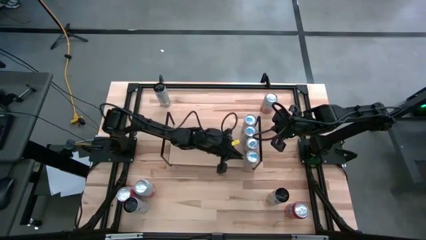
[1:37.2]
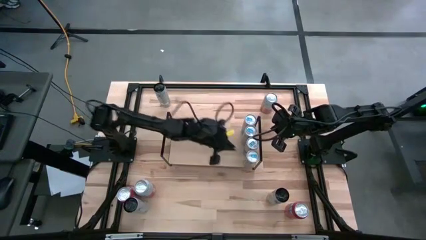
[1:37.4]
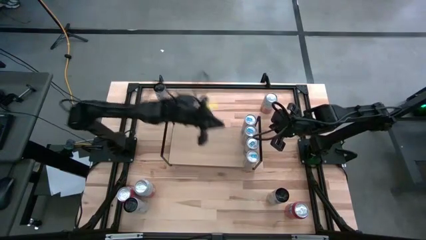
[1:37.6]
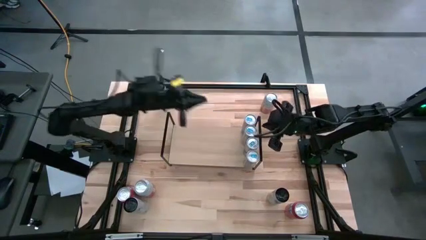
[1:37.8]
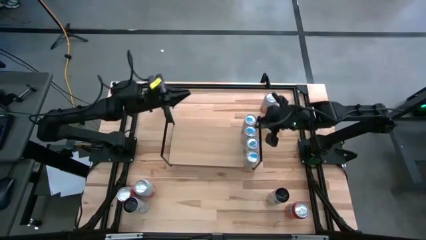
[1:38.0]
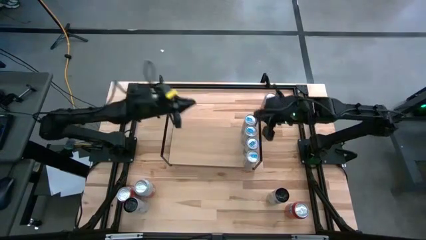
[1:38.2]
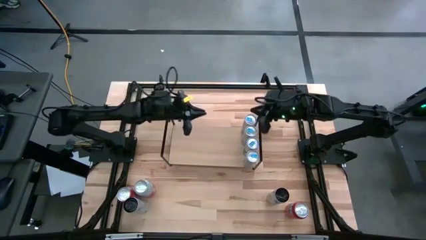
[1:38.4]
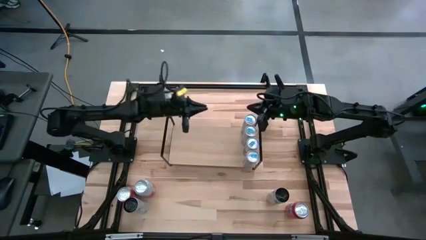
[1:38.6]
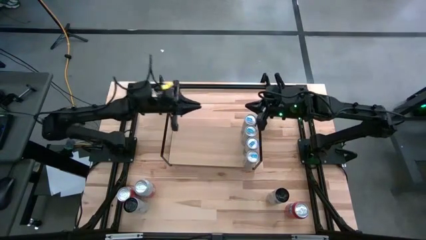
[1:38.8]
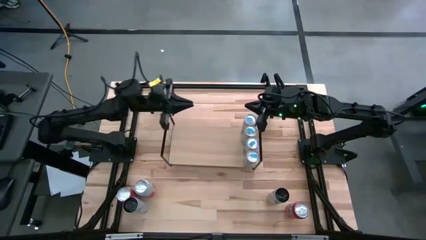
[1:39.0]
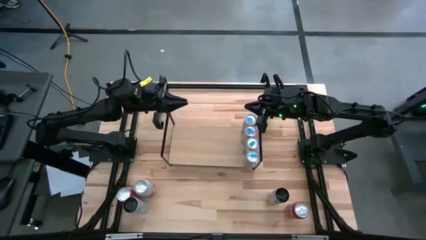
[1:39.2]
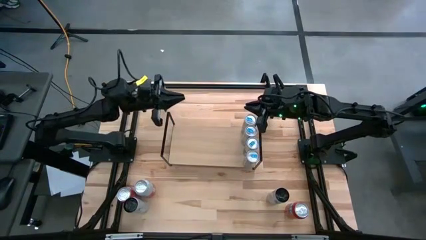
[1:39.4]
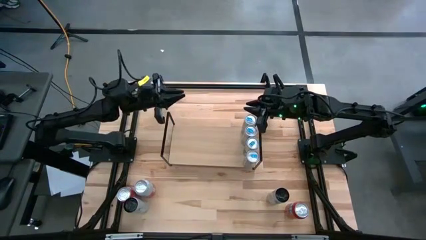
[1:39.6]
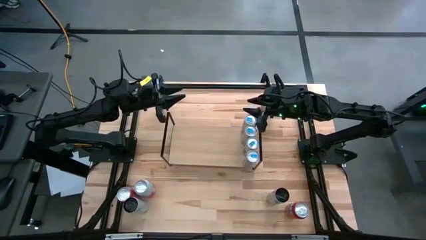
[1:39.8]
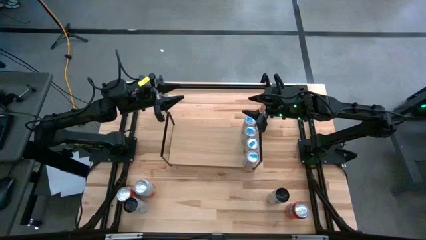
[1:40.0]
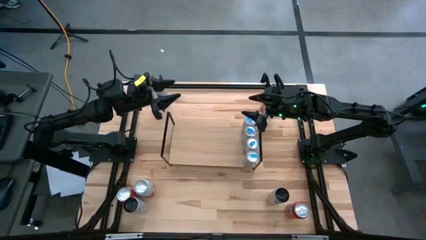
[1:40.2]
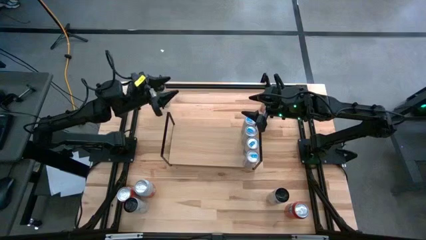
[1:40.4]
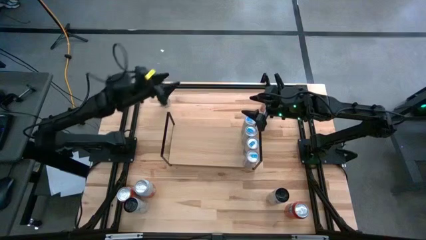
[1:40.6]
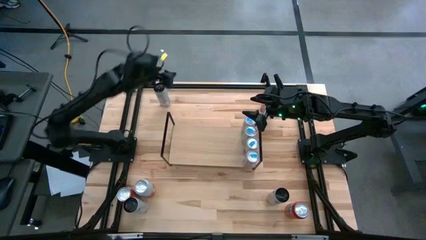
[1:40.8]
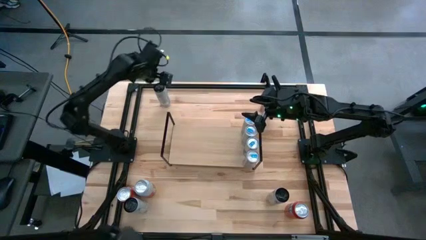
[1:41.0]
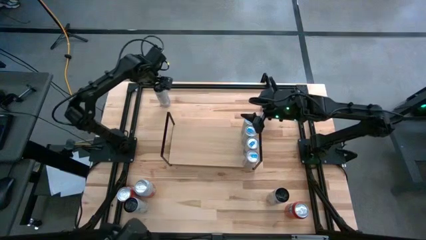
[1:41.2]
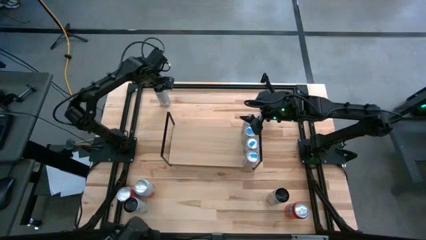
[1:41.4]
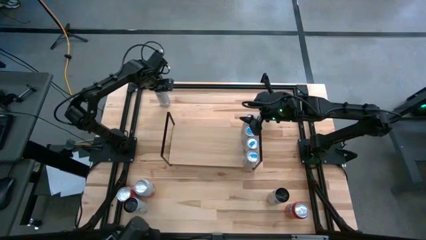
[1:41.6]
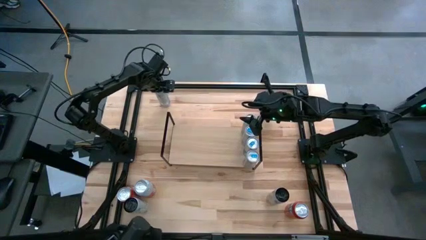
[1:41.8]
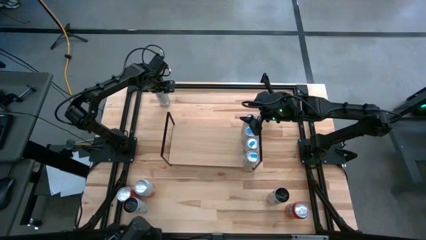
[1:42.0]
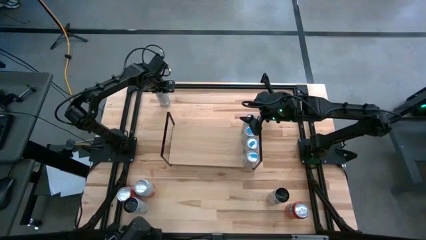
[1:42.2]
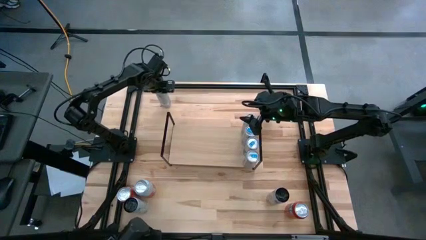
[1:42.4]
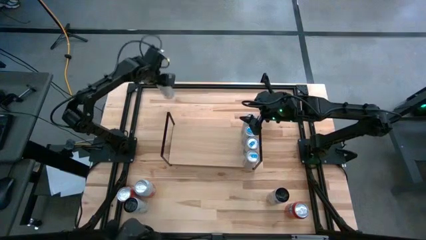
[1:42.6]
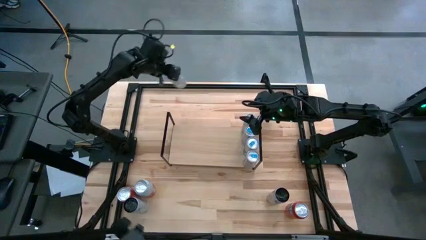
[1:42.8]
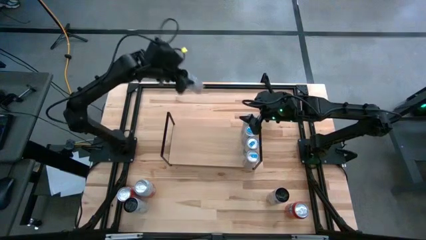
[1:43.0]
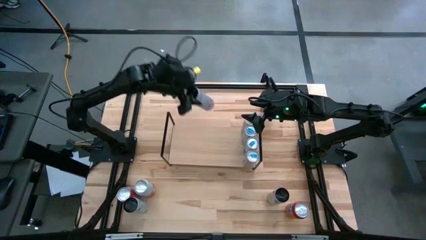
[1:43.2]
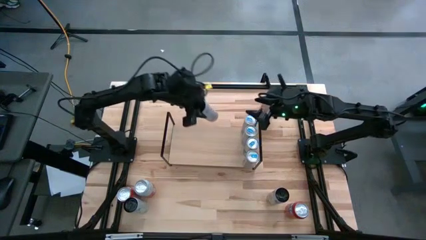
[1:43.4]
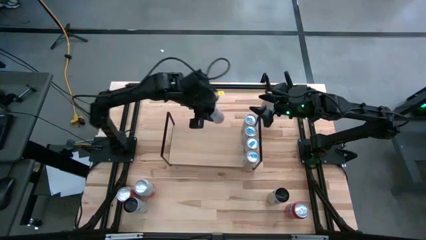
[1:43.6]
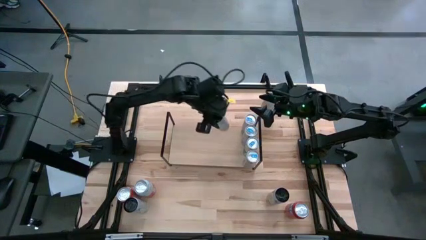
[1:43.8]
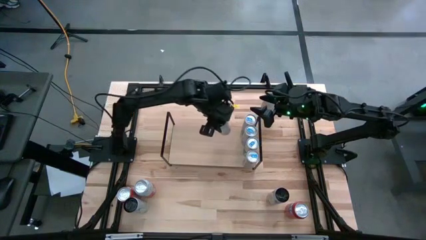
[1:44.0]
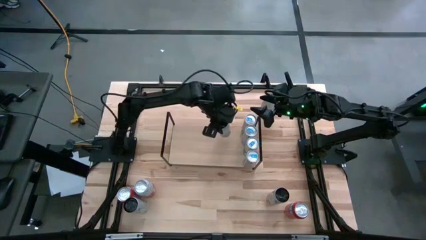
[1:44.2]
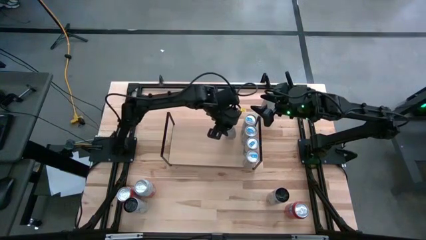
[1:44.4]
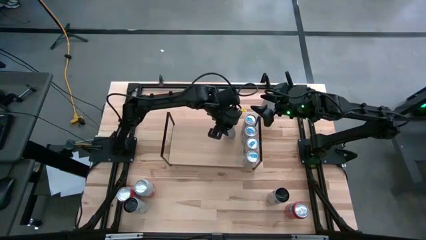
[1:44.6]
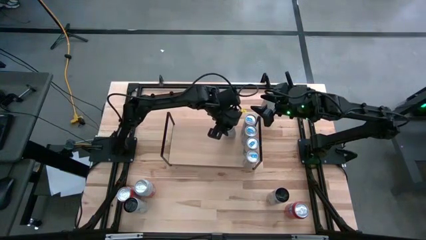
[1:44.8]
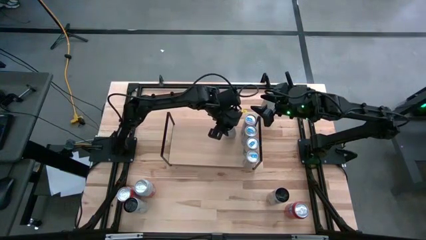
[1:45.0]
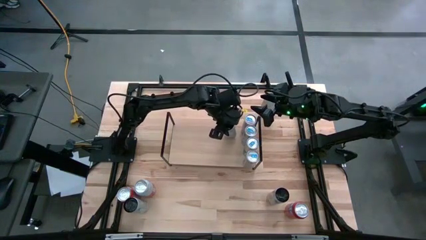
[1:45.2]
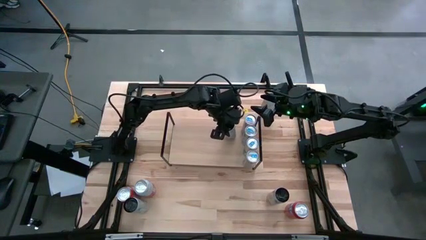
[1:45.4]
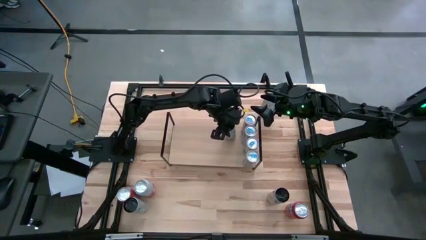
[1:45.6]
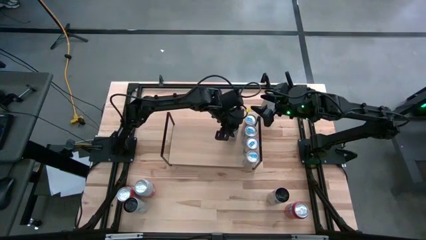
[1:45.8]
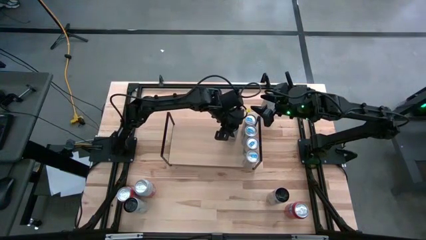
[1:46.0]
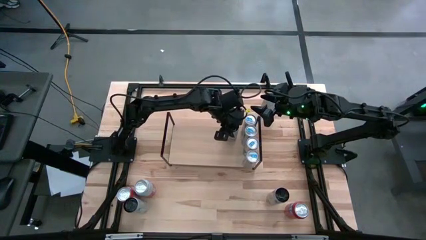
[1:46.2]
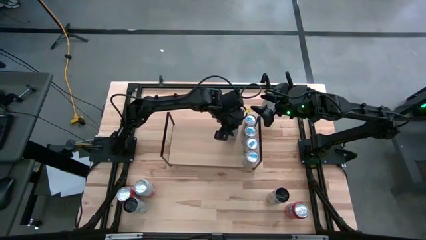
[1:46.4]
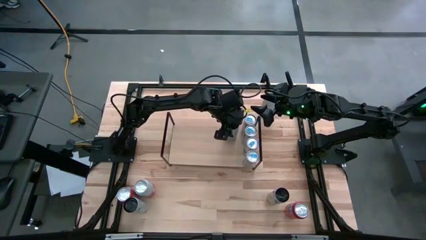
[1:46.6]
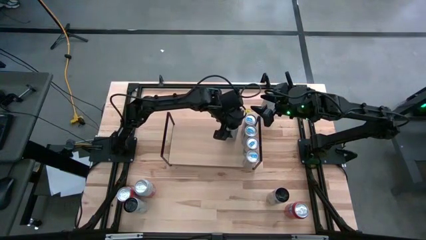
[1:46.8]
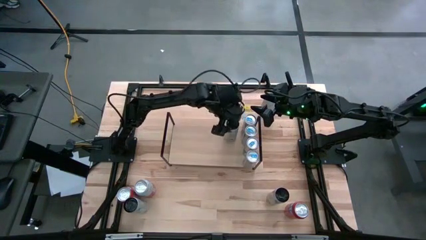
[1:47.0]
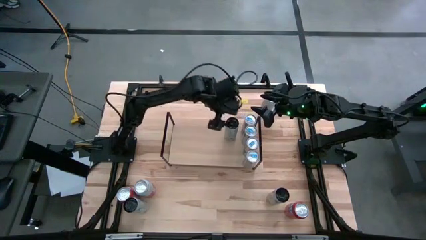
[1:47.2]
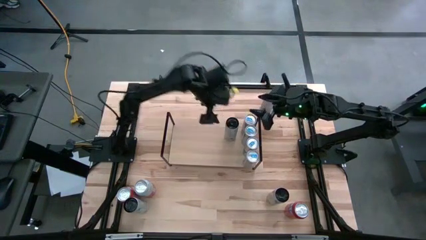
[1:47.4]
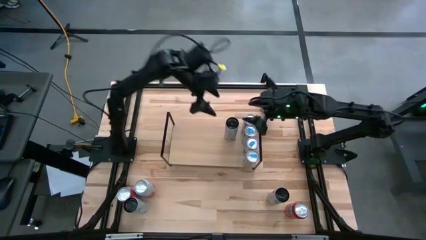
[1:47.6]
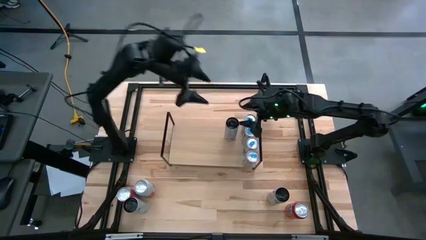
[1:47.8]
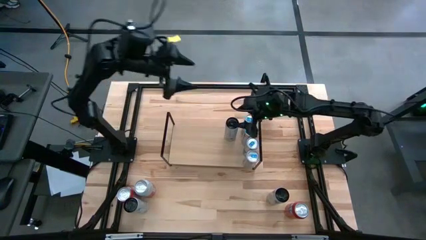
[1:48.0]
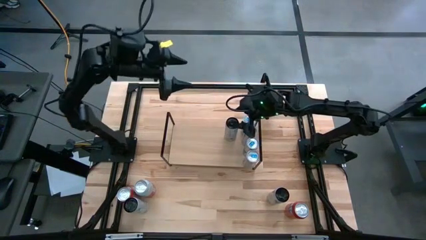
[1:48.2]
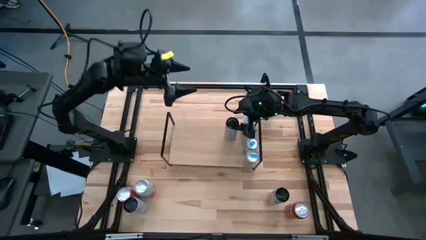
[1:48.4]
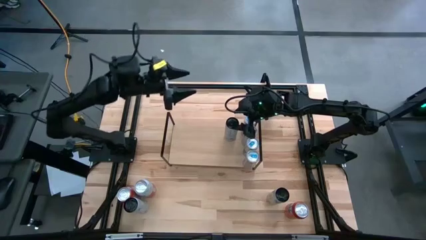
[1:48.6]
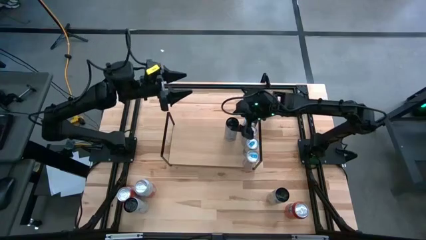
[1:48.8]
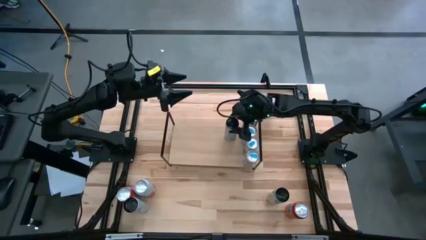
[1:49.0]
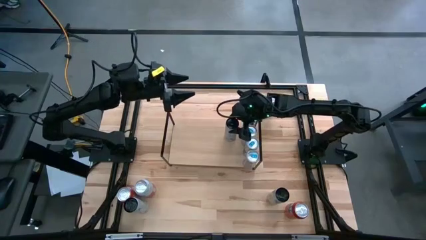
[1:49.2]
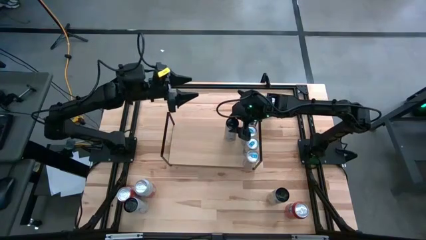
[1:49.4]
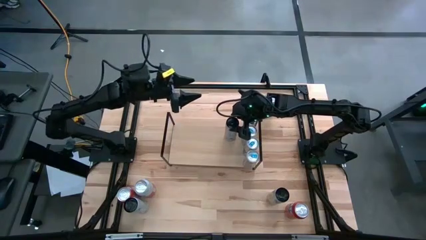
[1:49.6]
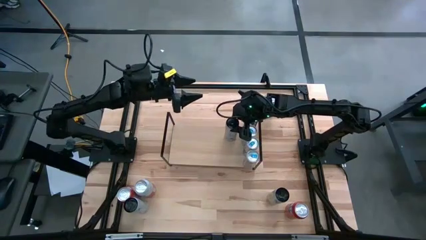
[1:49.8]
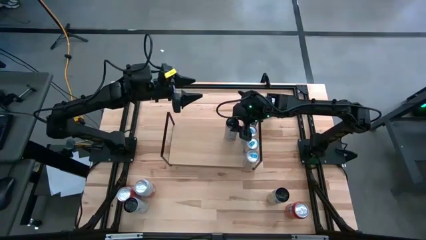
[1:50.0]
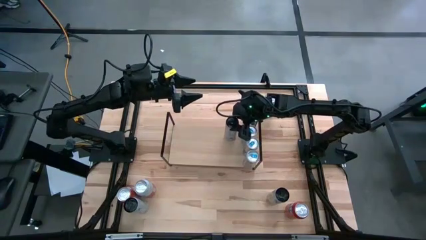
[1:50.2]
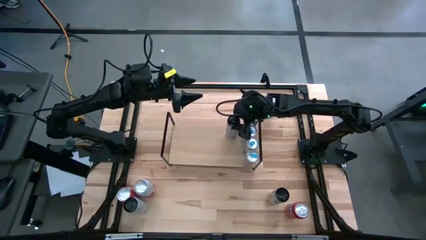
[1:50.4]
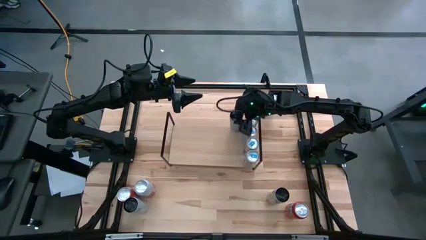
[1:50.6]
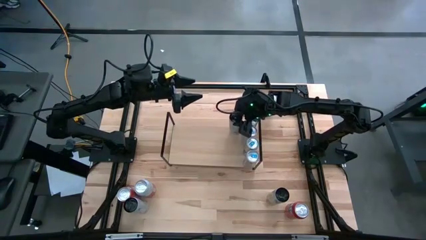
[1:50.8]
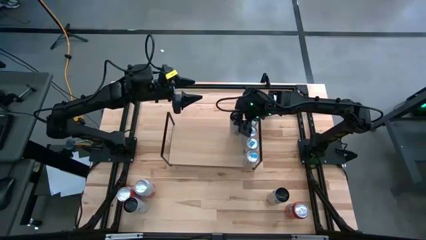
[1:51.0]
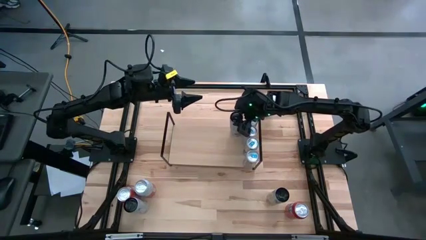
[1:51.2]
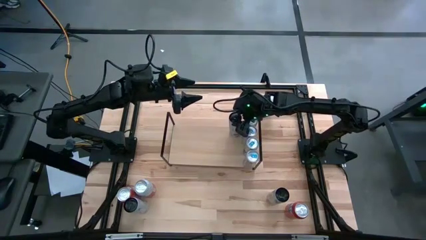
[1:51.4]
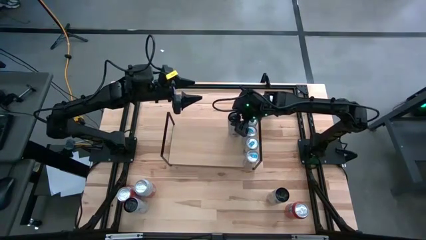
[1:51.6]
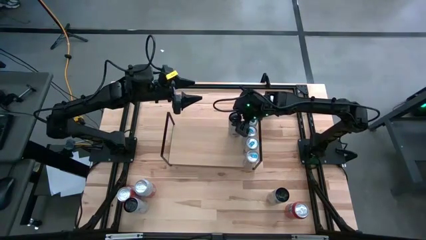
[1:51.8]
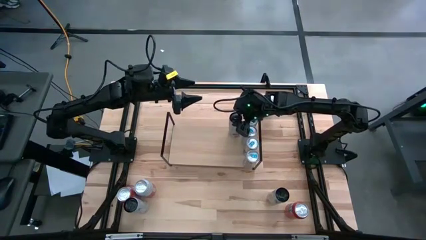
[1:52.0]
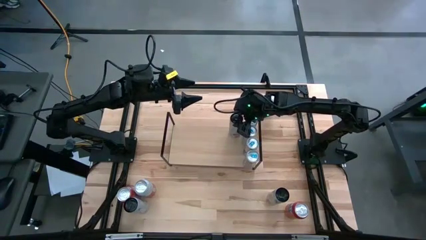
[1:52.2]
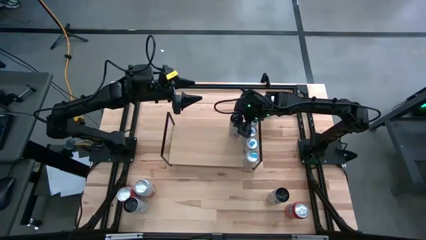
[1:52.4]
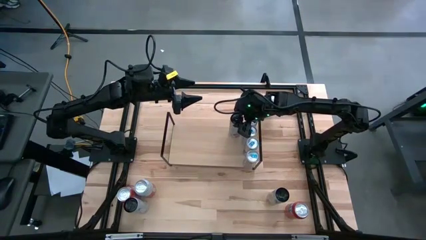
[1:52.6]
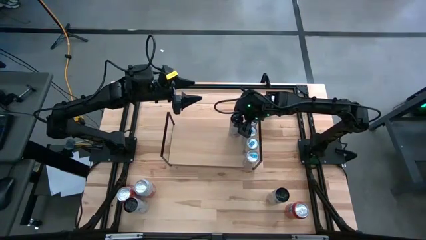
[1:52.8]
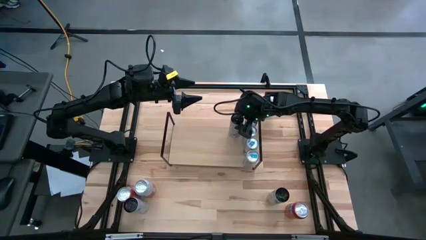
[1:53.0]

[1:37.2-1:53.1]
Task: Place canned beverage on shelf
Put the black soda can on the shelf
